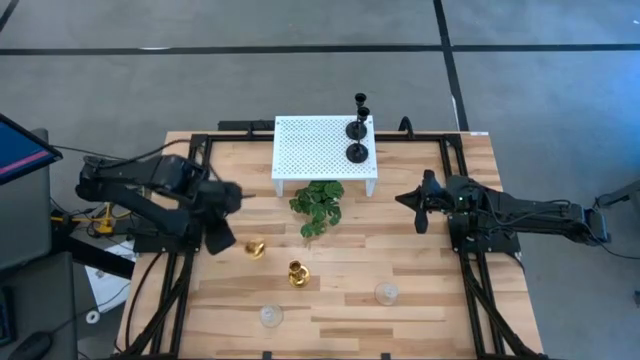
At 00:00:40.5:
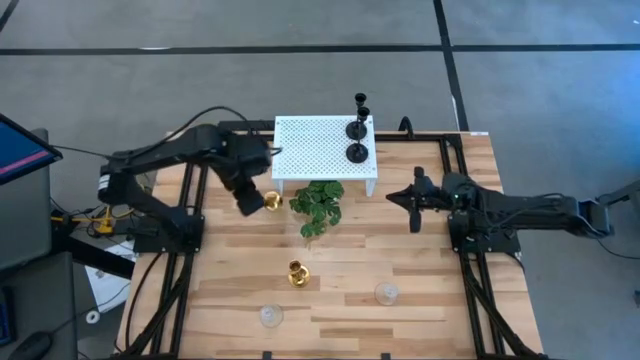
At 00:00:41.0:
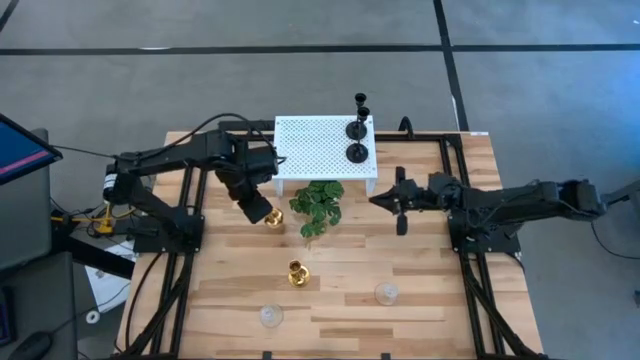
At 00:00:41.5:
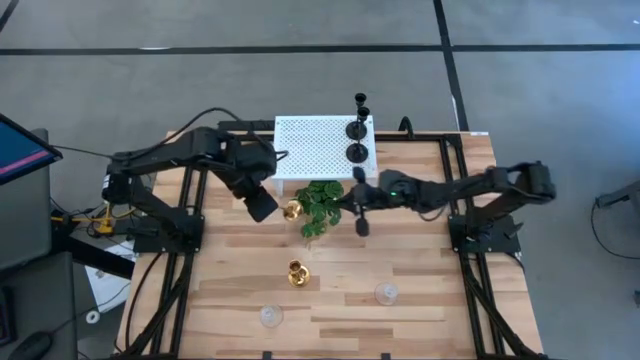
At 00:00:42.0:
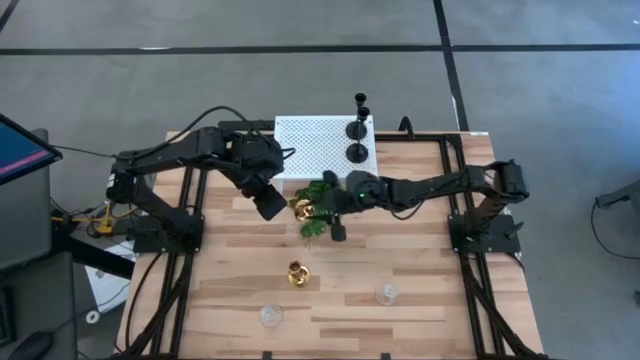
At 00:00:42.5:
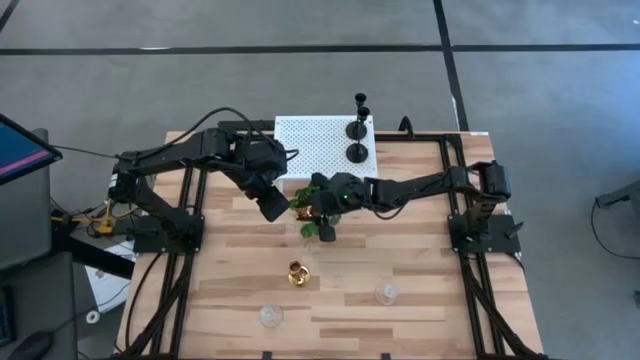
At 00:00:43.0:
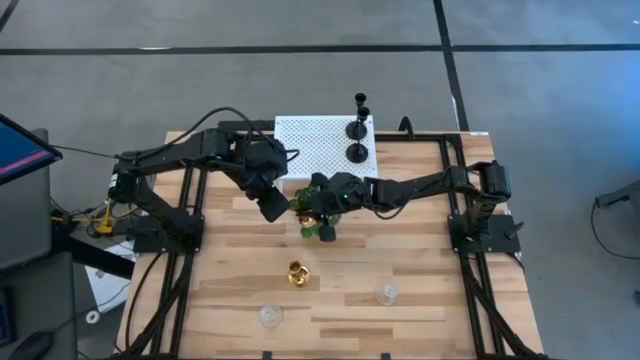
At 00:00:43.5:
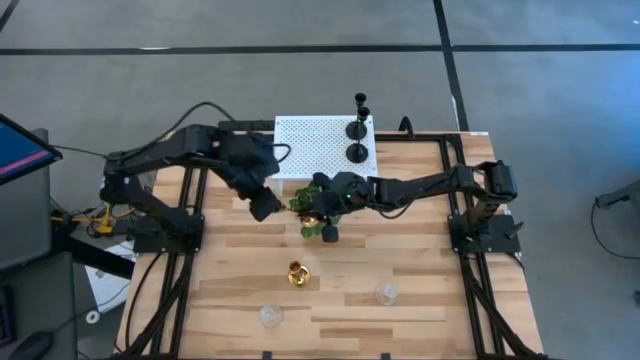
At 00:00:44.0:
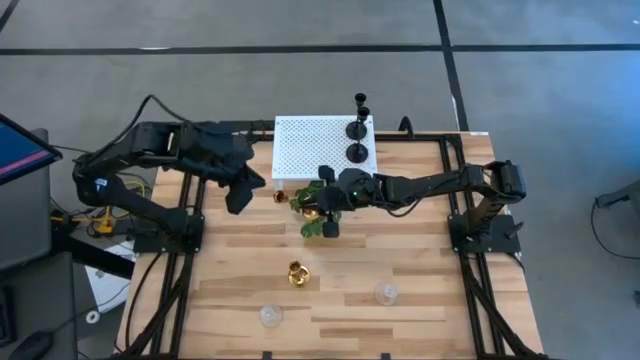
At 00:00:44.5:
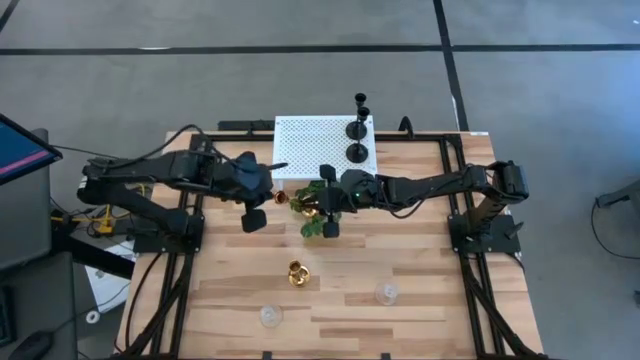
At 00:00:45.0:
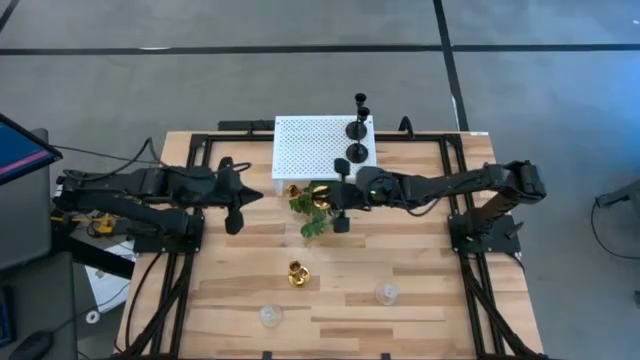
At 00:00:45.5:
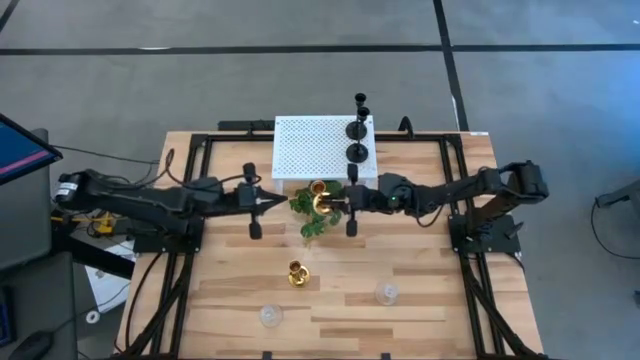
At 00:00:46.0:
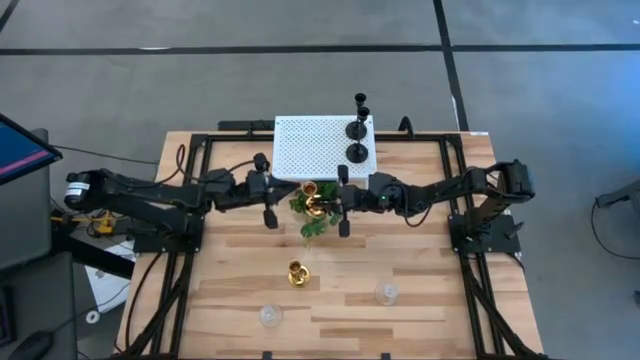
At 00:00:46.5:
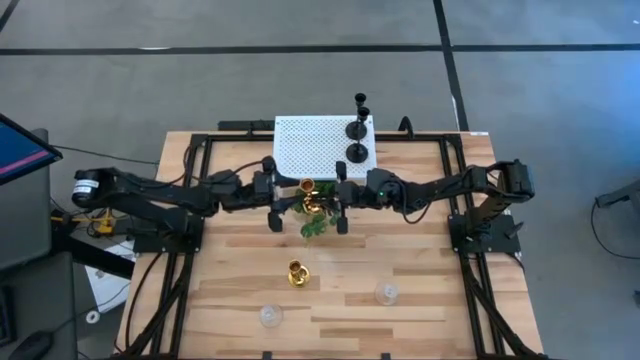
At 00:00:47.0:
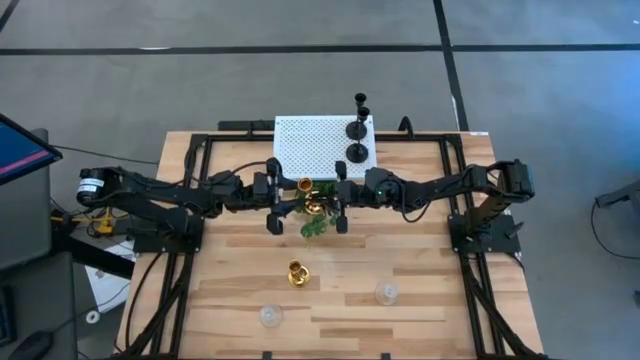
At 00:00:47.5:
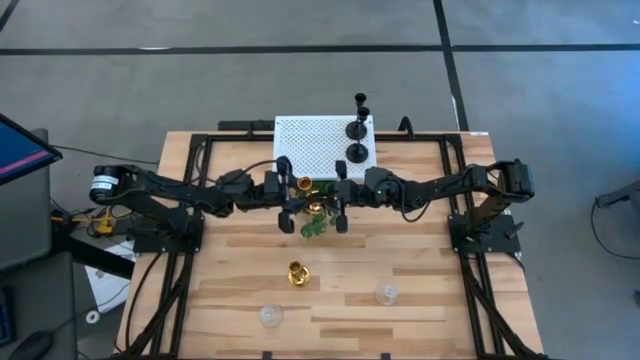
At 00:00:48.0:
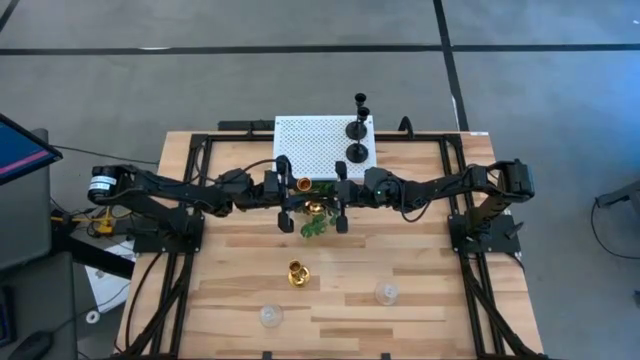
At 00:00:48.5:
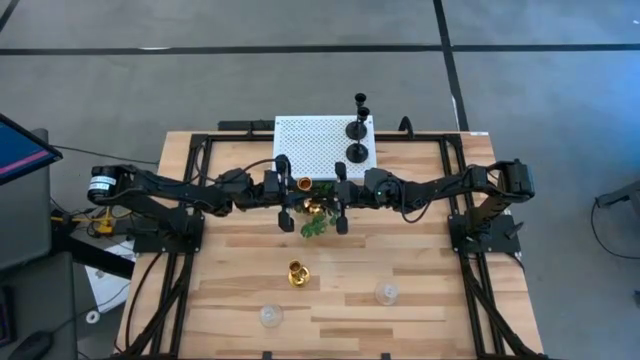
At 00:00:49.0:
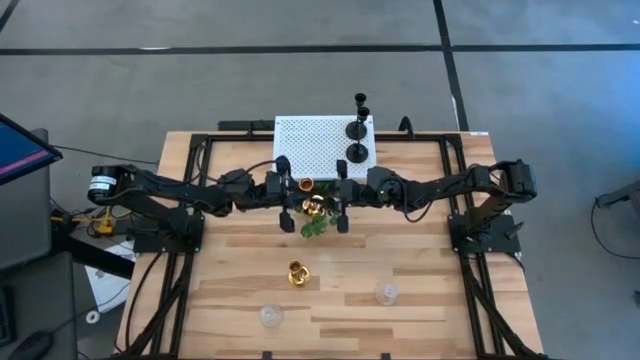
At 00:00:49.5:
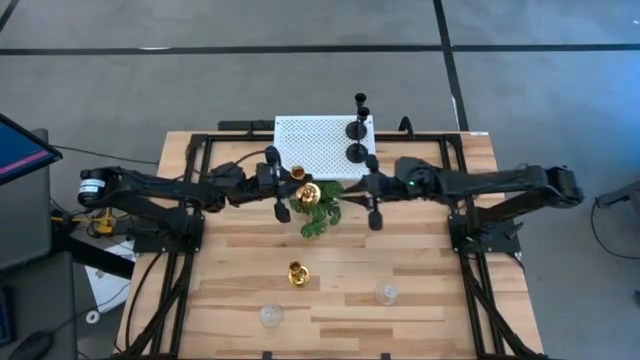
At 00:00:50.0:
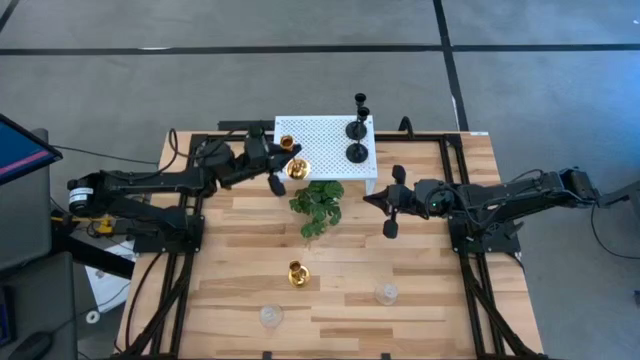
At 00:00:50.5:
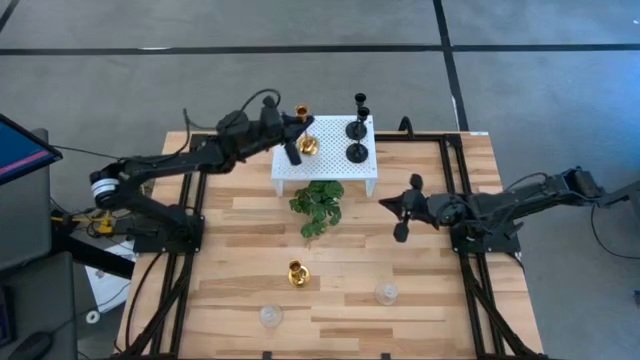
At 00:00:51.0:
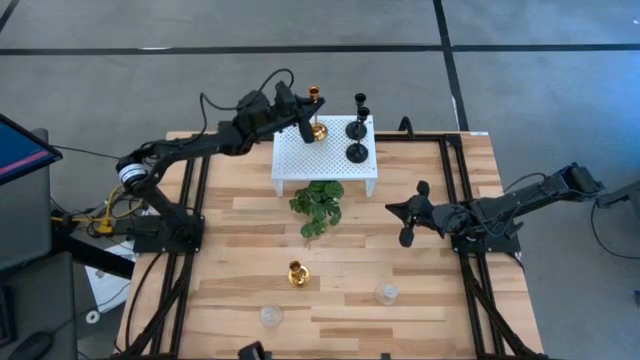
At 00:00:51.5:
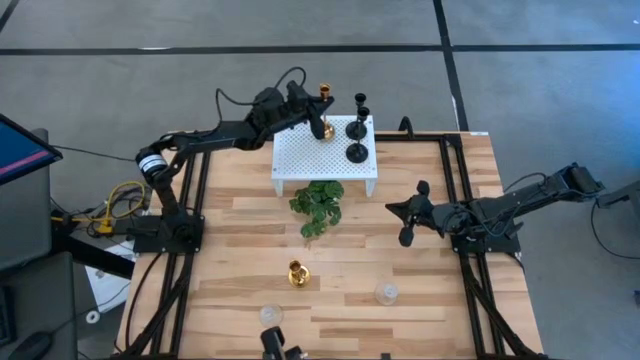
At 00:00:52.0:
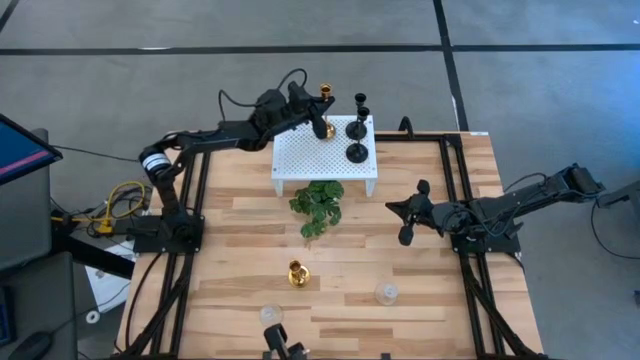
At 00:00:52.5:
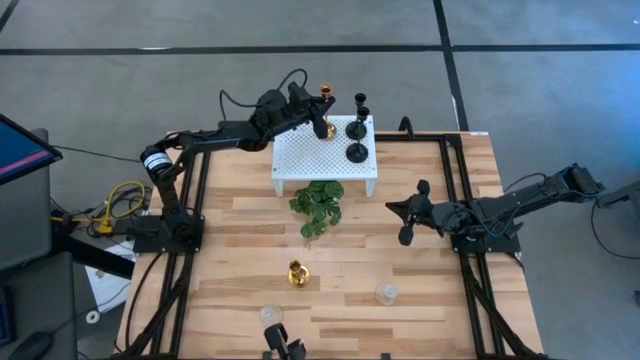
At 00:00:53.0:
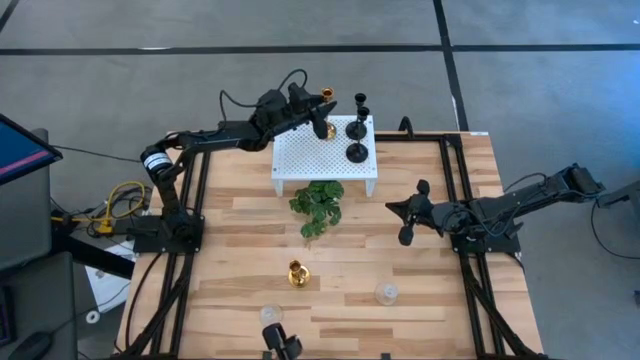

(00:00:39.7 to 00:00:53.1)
Task: Pick & Place candle stick holders
Put the left gold candle holder on the shelf

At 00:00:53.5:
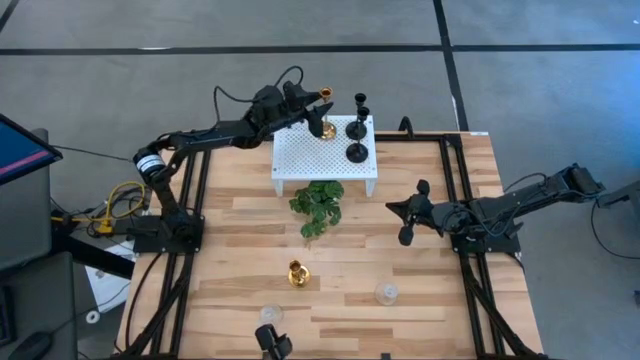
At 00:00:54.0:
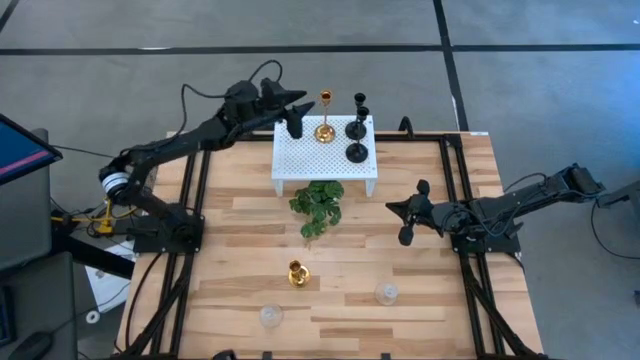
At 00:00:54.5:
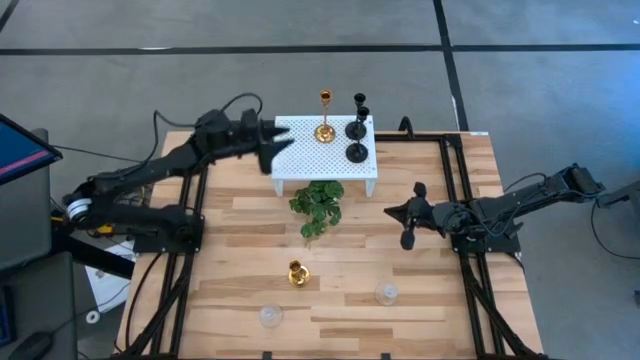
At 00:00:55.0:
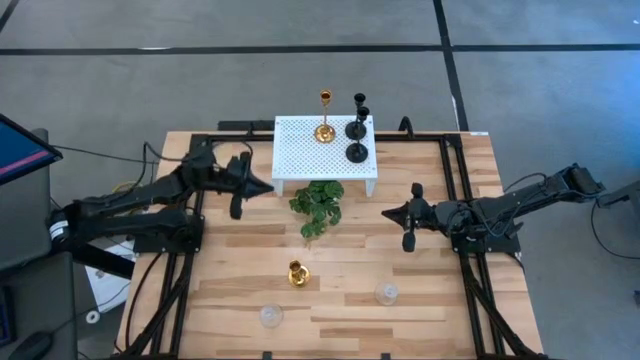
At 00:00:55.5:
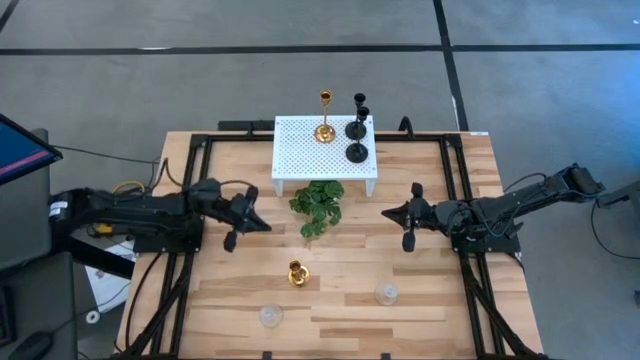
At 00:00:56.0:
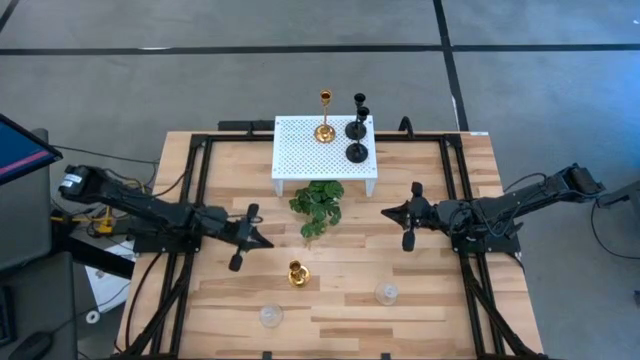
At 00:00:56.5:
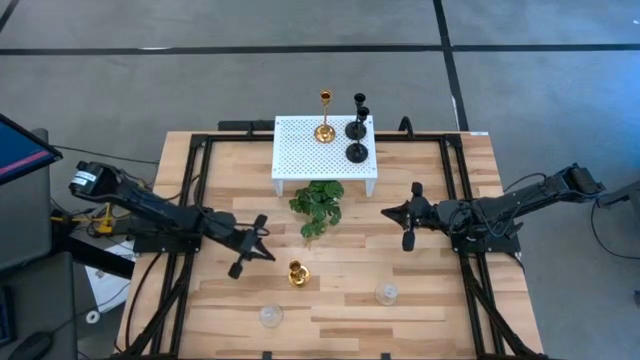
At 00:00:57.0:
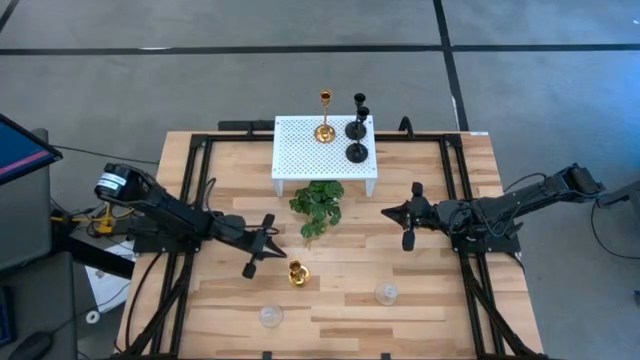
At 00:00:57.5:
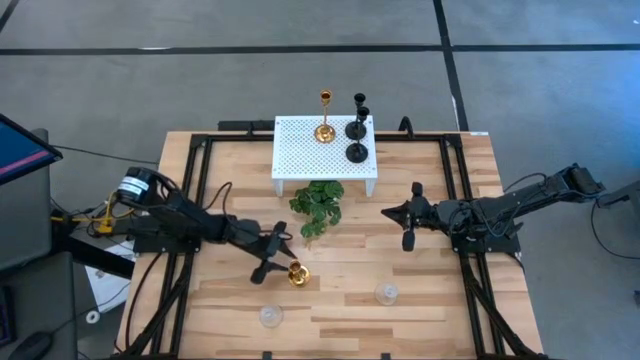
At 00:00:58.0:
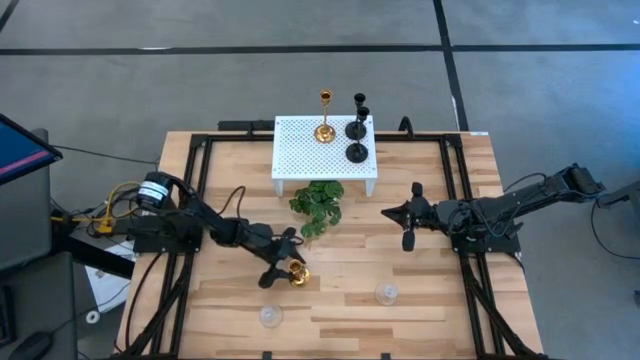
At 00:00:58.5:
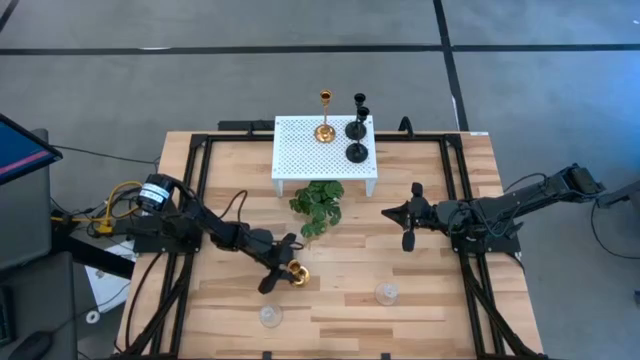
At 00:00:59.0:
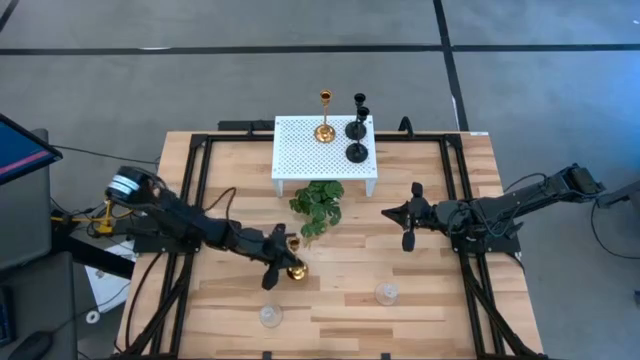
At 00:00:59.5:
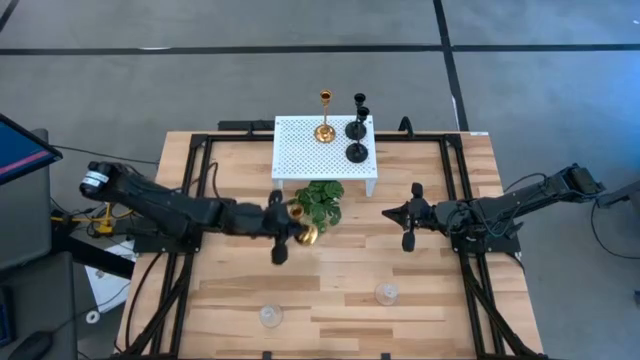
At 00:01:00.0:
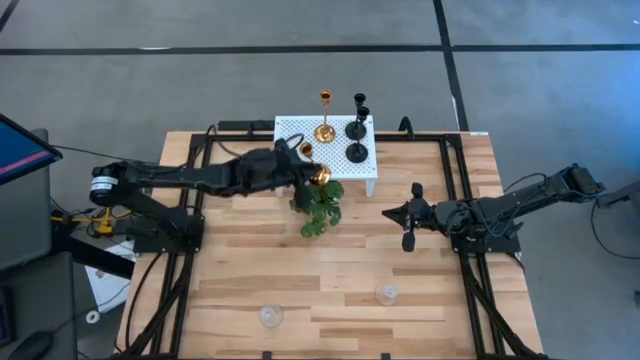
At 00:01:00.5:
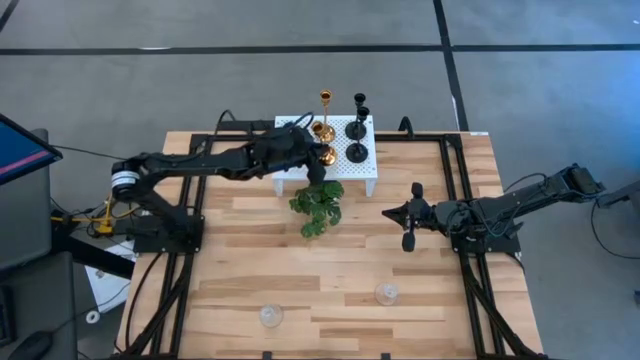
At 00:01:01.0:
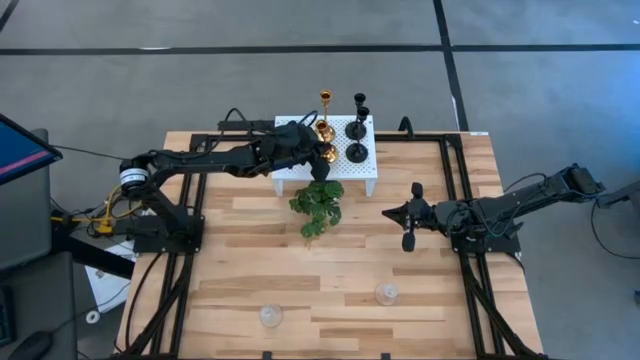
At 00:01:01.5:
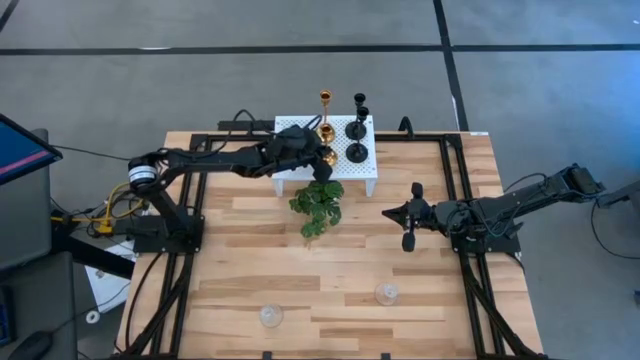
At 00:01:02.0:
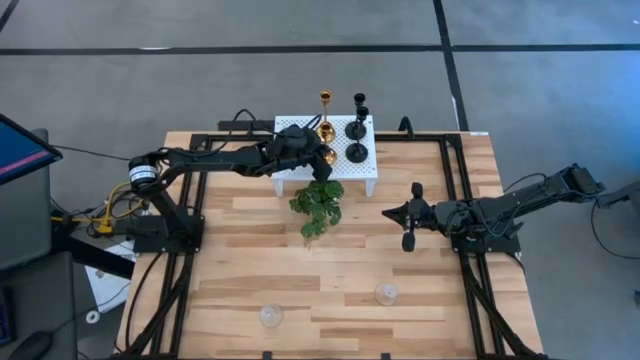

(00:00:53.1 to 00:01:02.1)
Put the gold candle holder on the shelf aligned with the other gold candle holder
